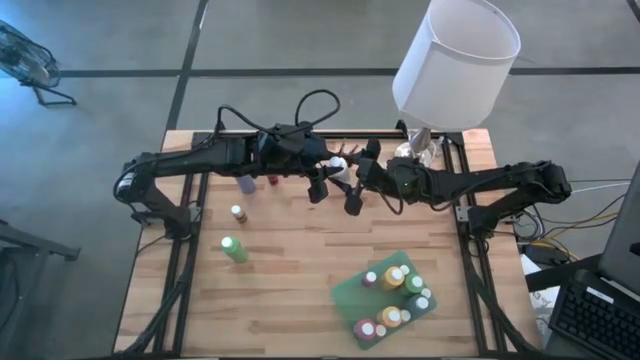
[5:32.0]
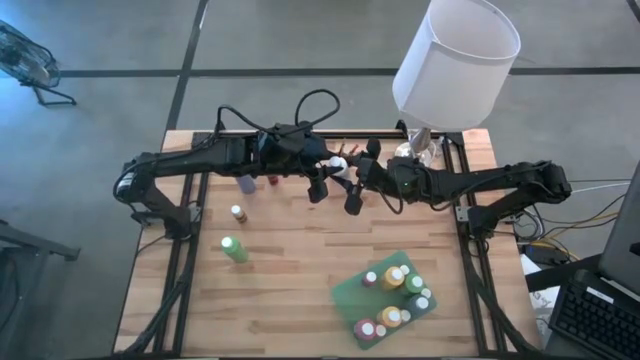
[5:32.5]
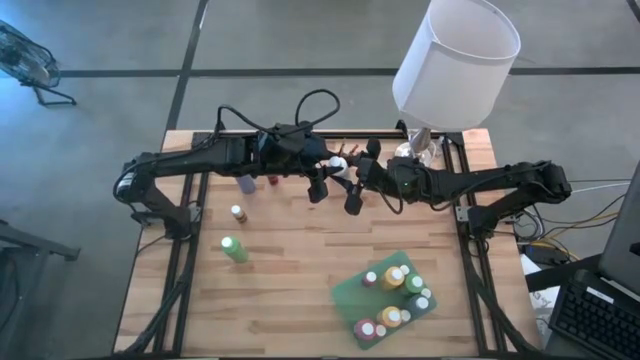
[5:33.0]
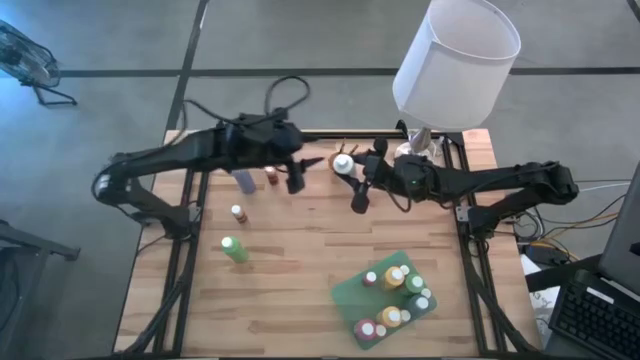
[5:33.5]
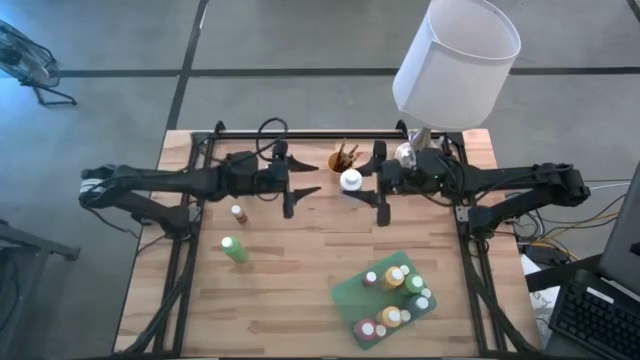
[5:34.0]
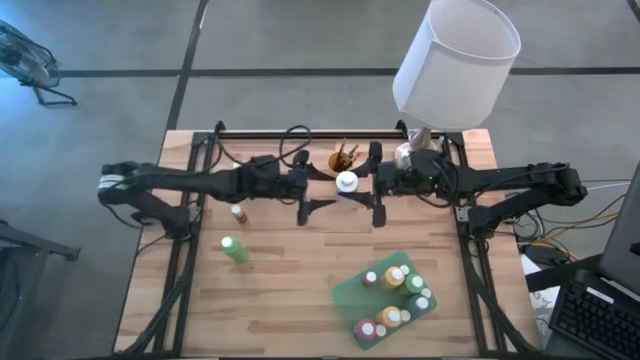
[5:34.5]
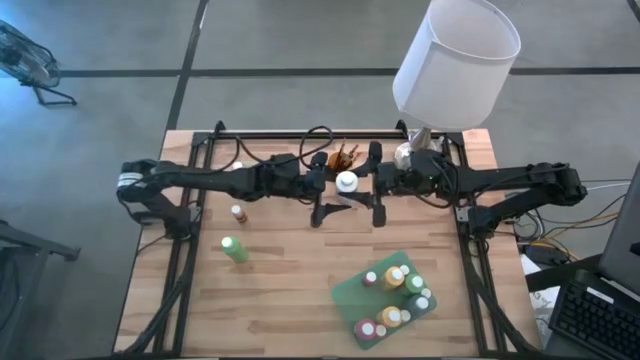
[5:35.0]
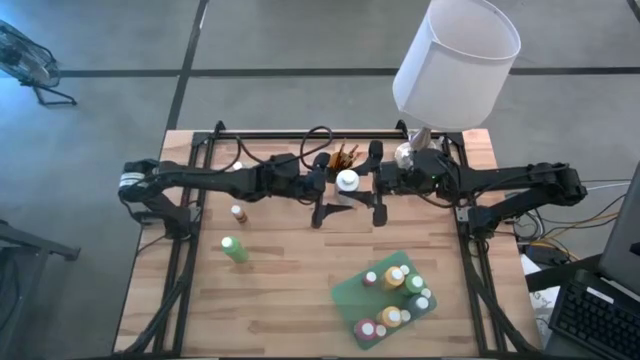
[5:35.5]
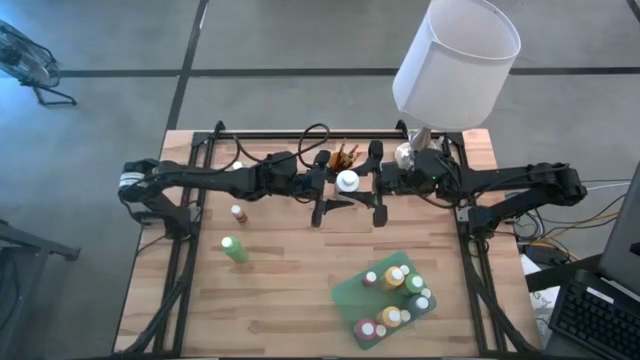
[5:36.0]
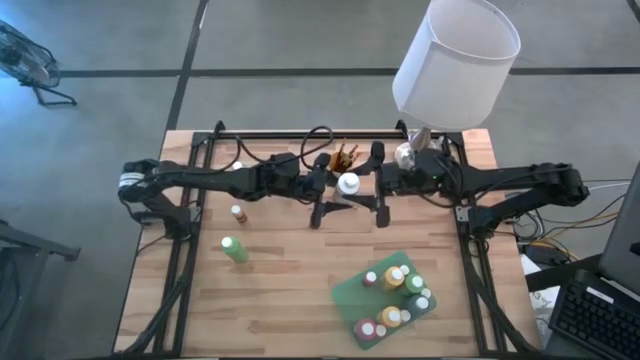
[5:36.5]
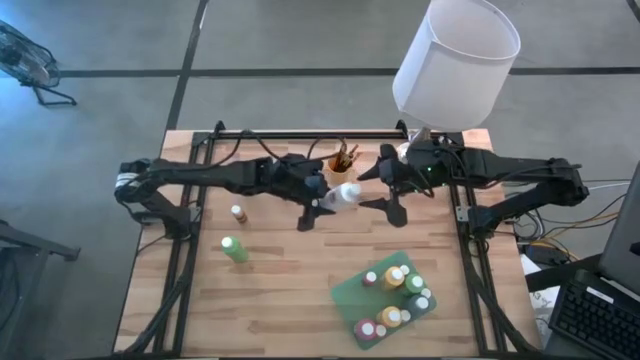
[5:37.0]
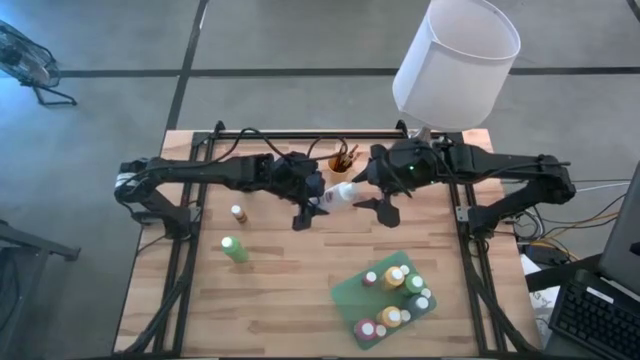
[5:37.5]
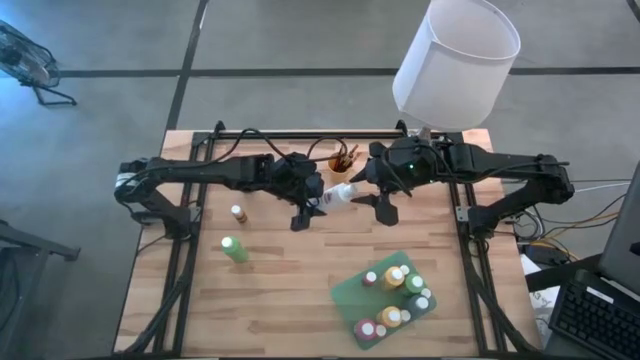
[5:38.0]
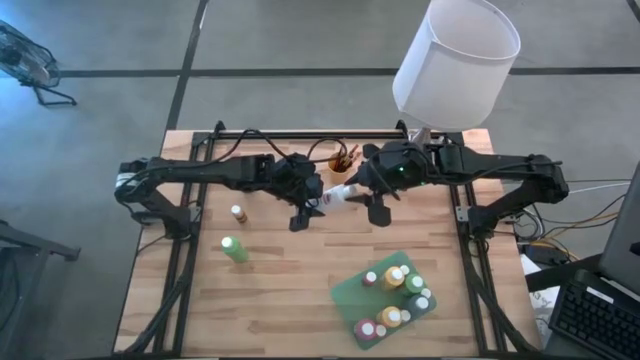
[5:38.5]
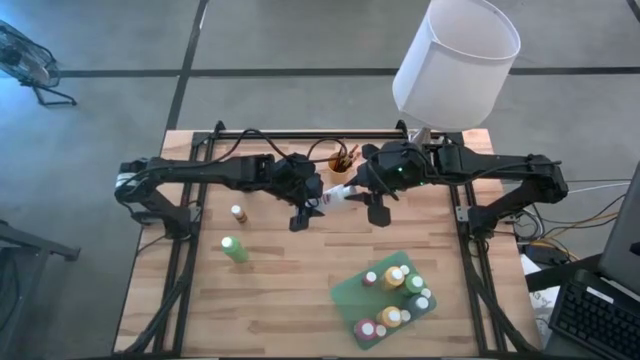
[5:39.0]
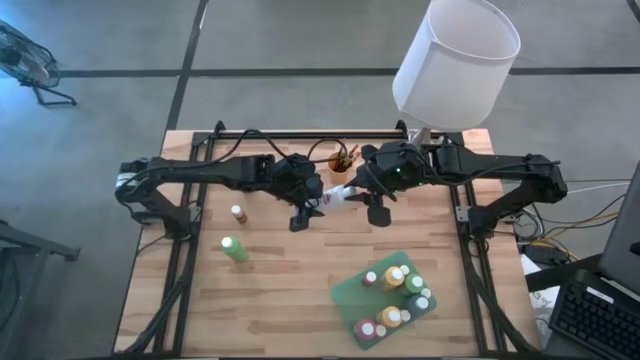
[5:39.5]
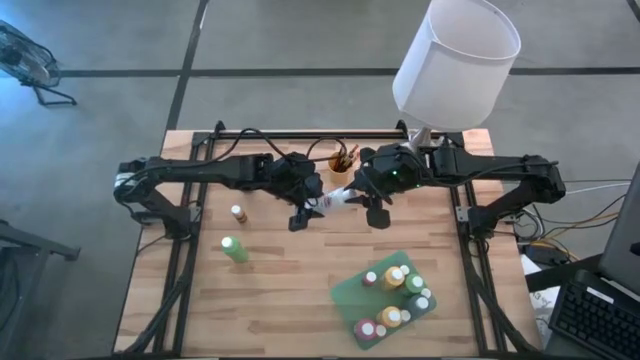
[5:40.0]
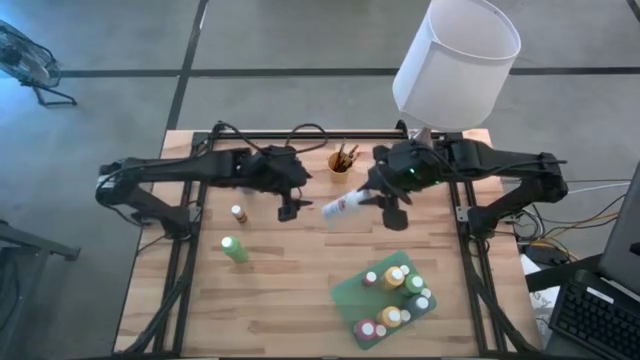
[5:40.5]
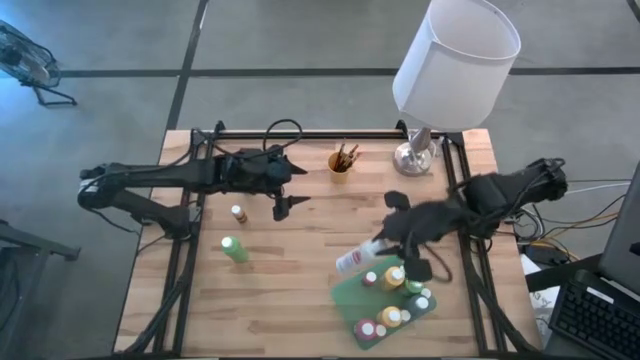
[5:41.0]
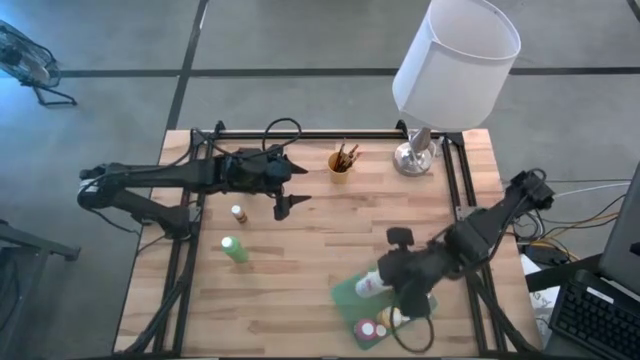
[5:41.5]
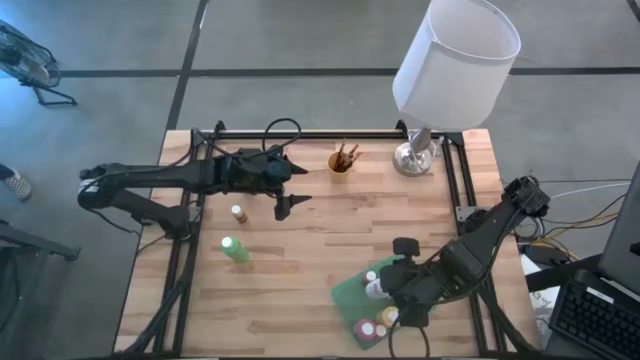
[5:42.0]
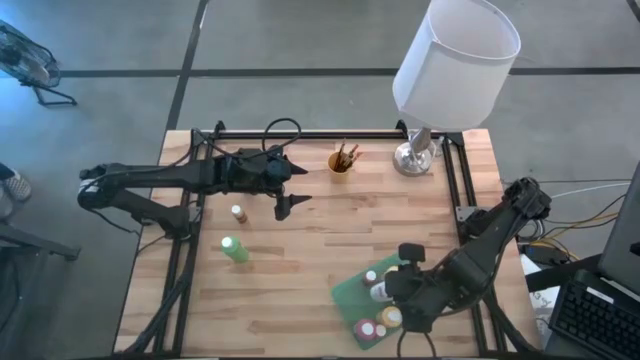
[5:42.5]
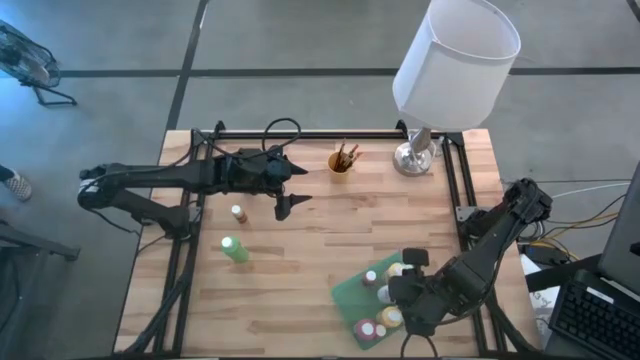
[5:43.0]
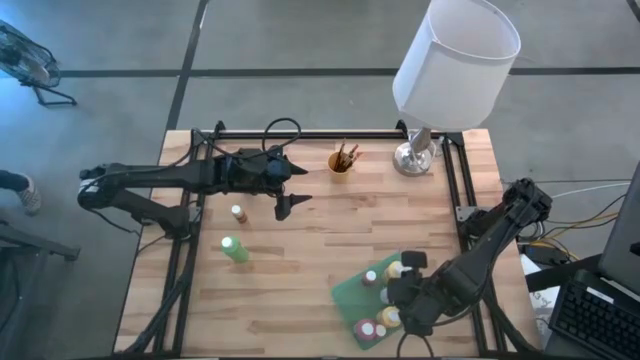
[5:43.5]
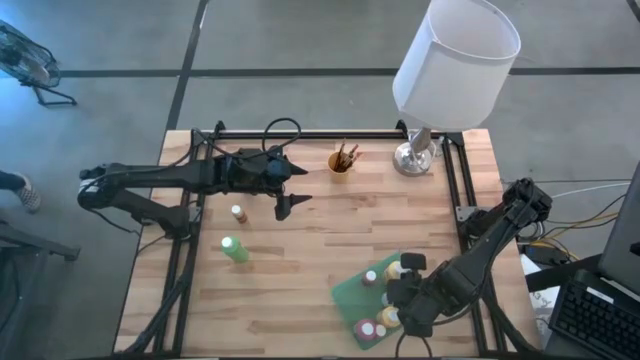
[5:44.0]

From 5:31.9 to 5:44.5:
Task: Pick & Place Paint Supplies
Put the big white paint bottle into the green bin

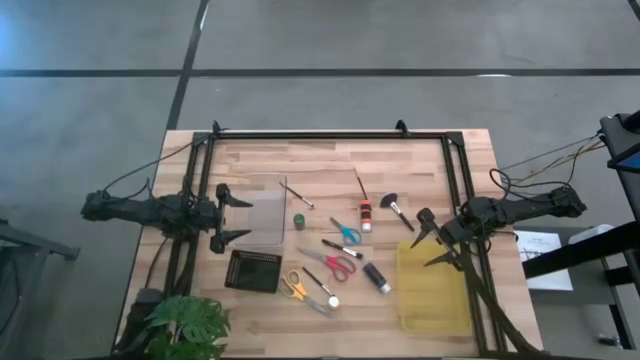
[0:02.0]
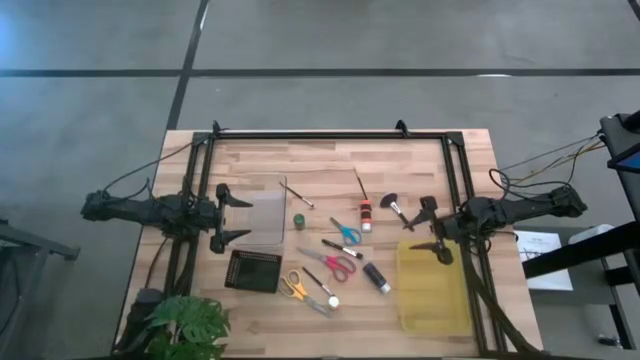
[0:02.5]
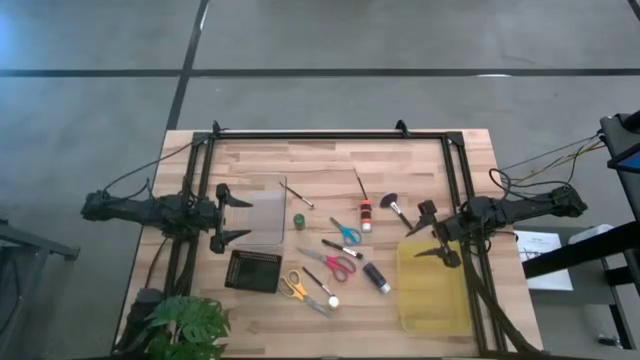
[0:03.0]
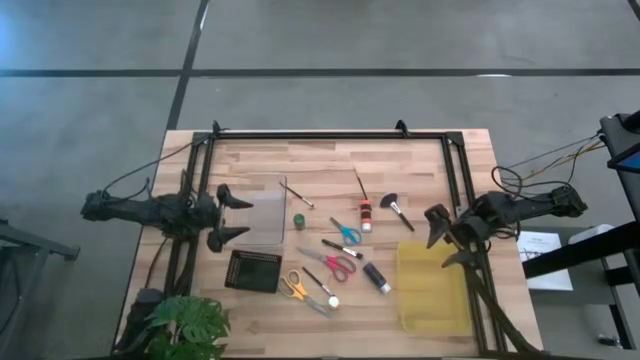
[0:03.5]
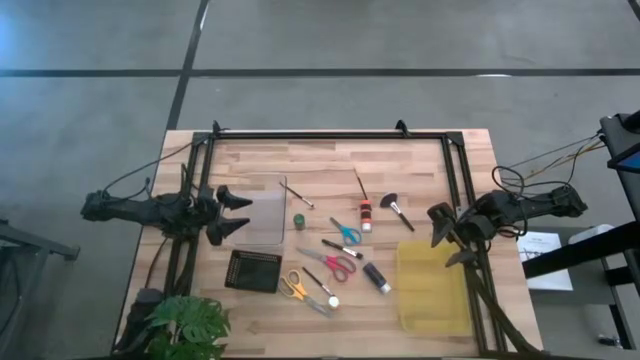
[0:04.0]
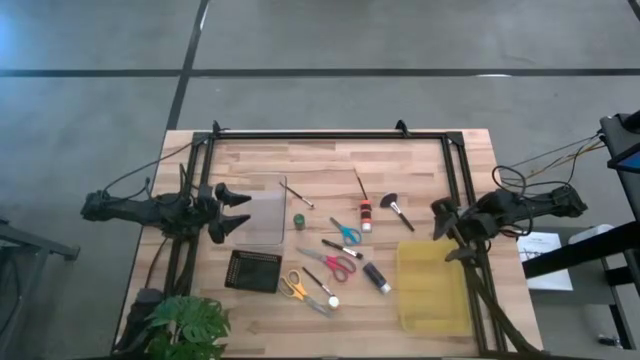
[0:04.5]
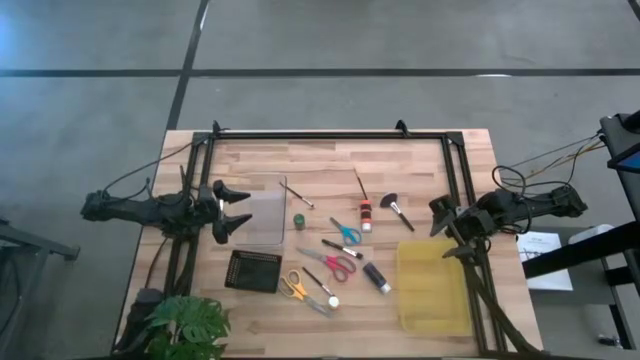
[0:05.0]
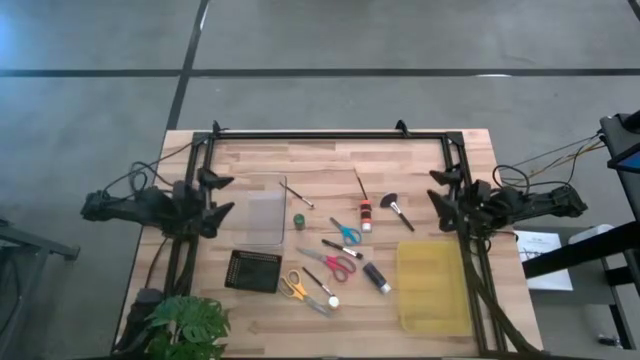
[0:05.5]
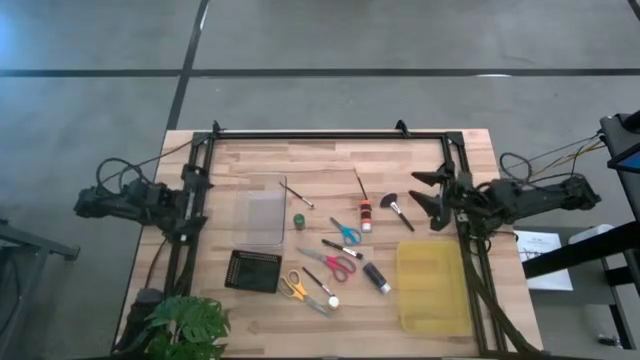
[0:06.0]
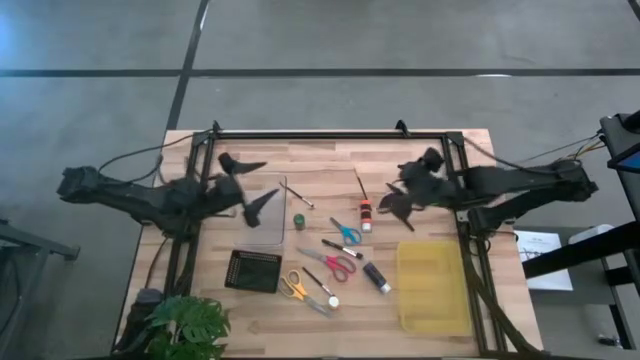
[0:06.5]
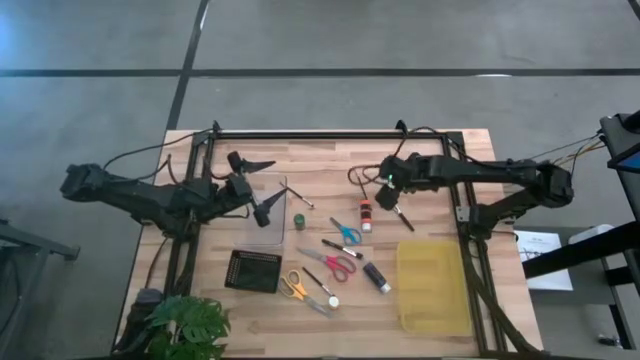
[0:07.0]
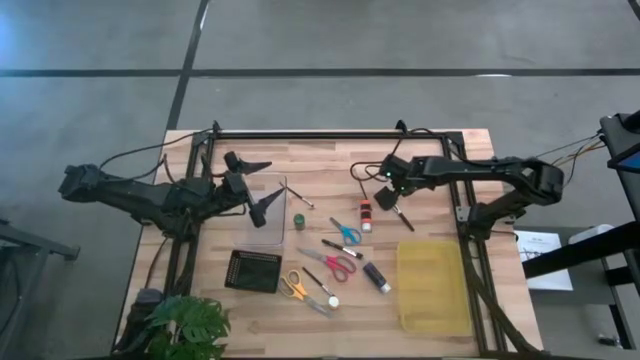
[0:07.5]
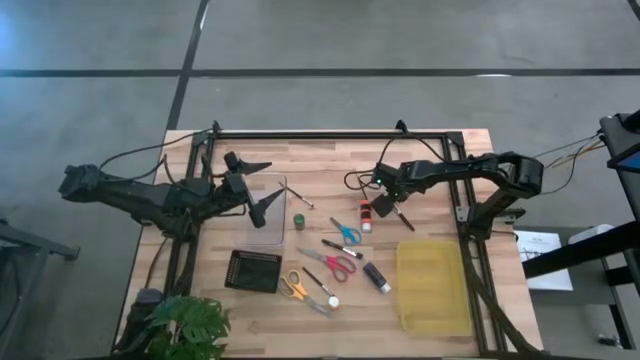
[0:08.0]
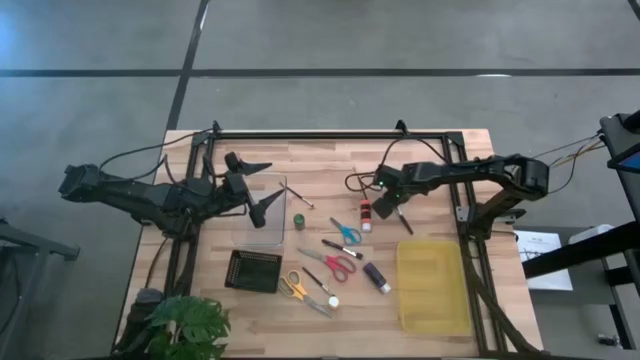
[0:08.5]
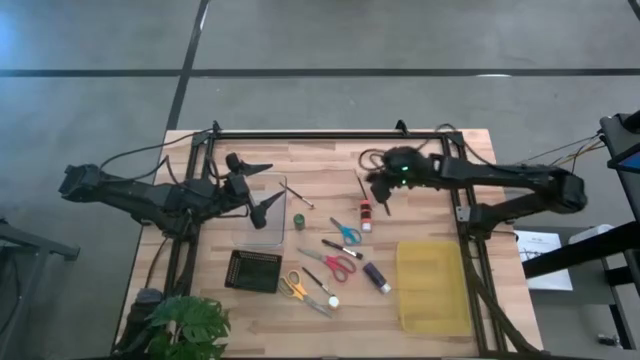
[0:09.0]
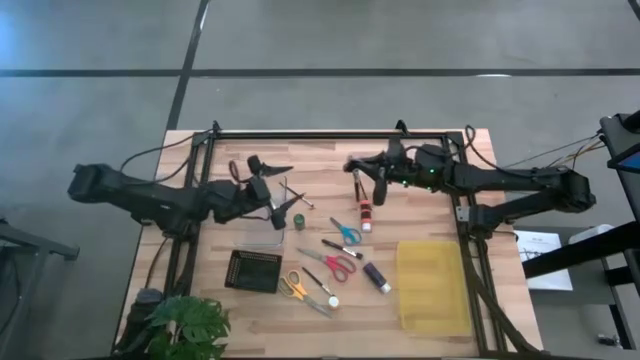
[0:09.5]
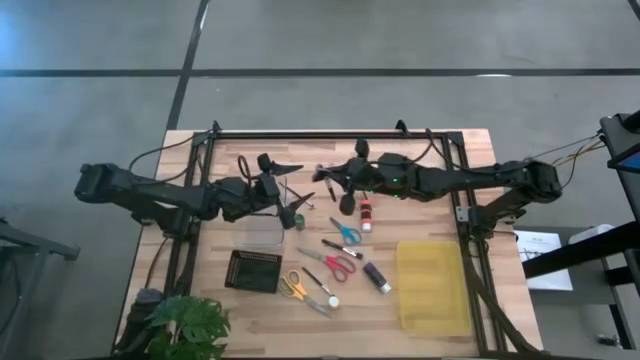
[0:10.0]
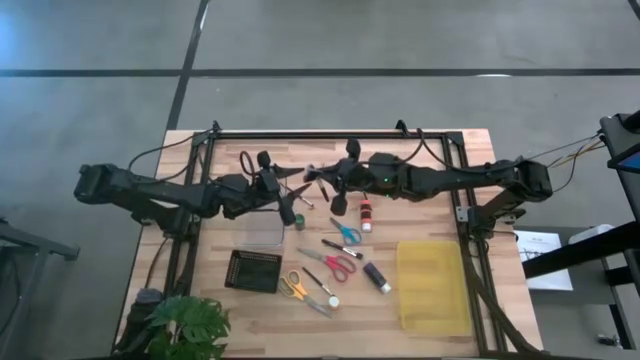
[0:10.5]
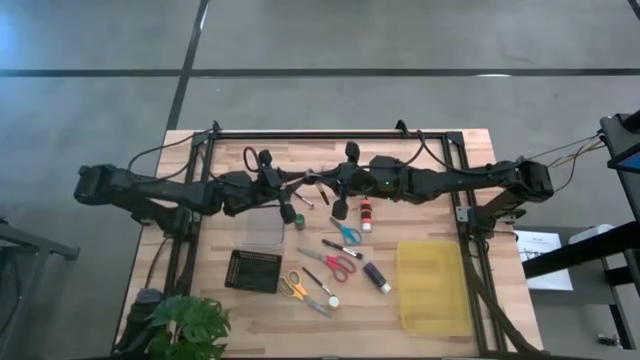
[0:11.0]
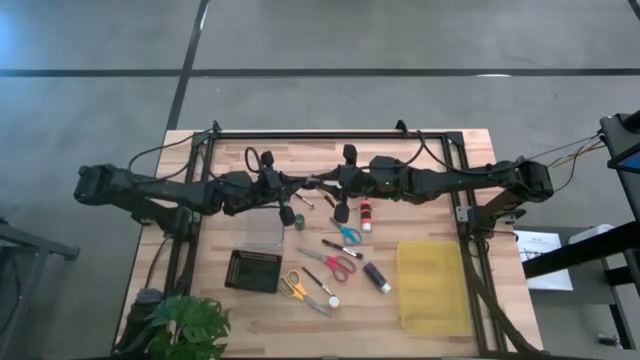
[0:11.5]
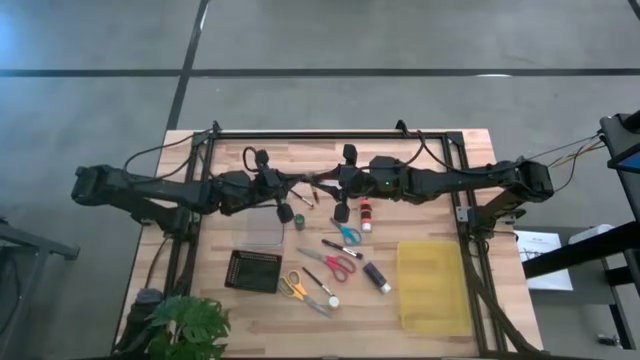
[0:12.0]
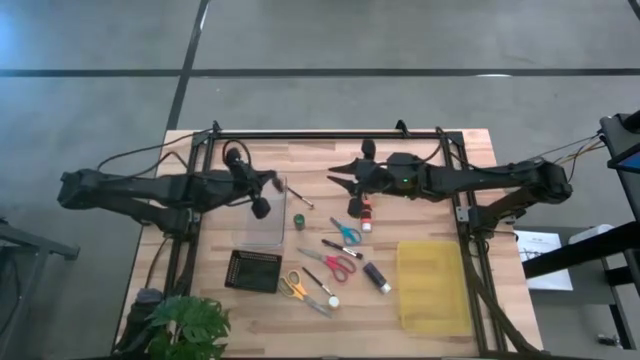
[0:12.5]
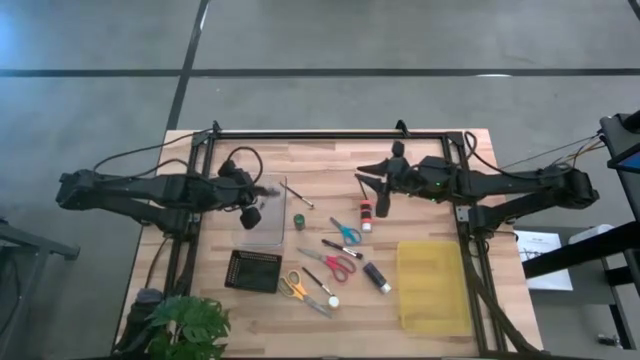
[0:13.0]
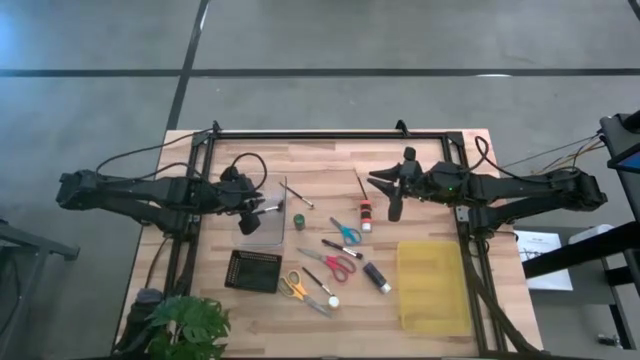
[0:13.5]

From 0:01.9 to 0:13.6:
Task: Pick & Place Paint Supplies
Put the highlighter brush into the transparent bin
